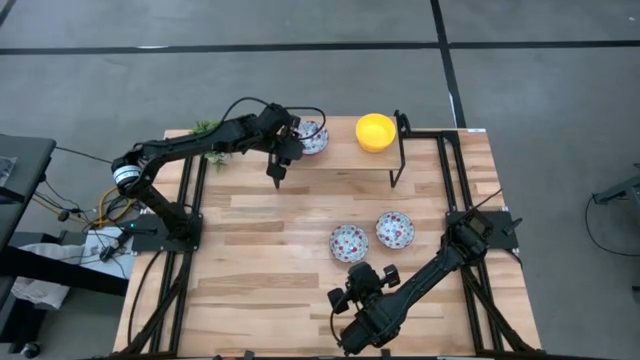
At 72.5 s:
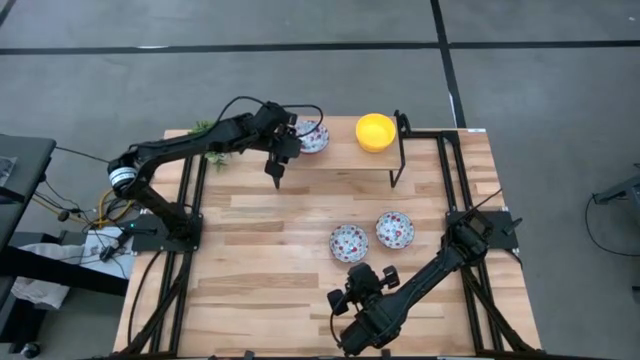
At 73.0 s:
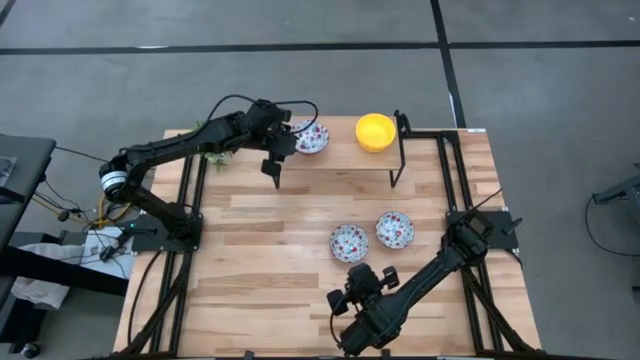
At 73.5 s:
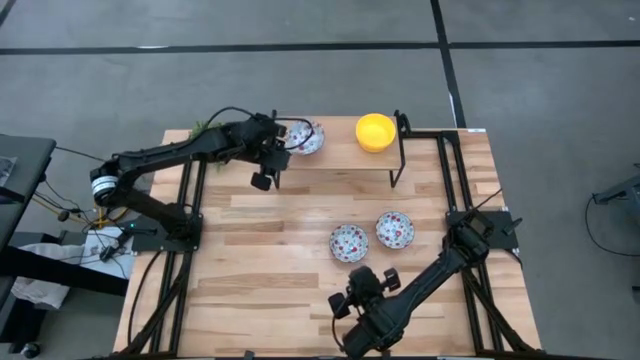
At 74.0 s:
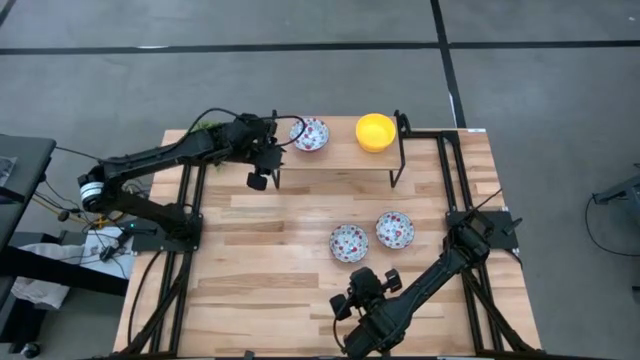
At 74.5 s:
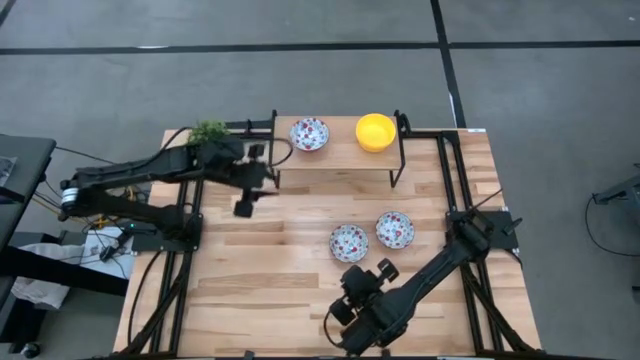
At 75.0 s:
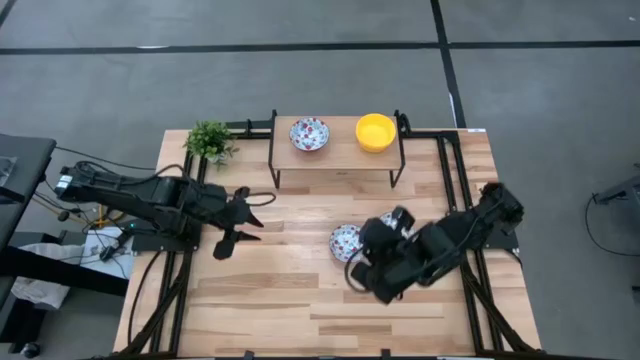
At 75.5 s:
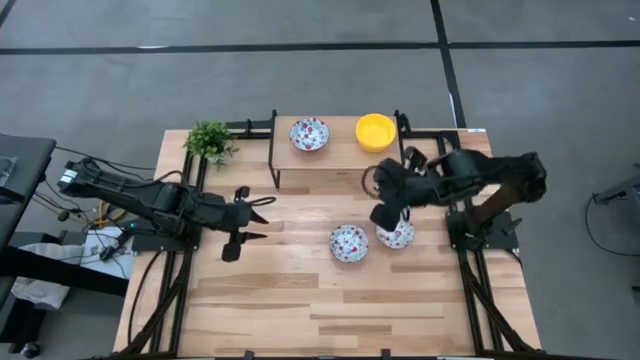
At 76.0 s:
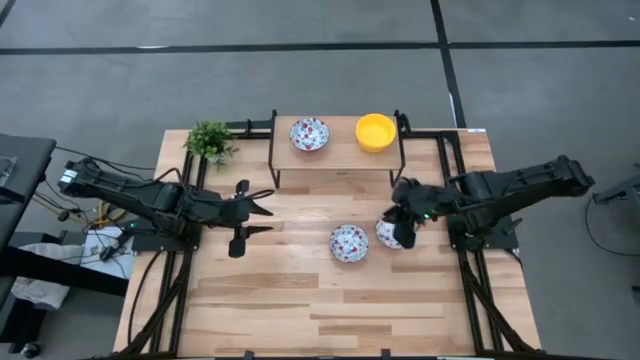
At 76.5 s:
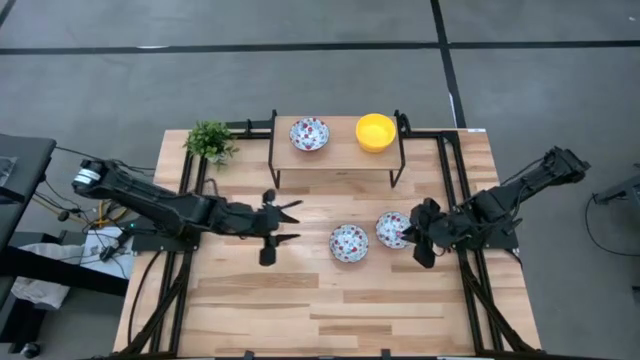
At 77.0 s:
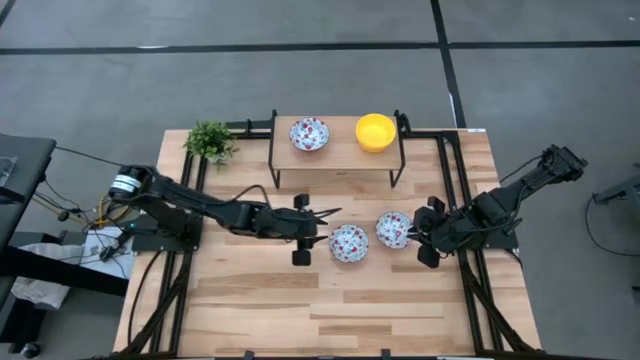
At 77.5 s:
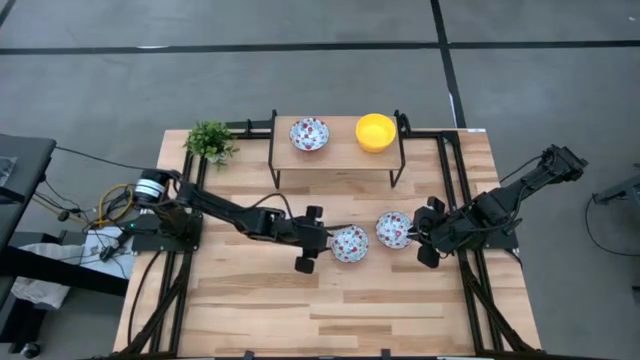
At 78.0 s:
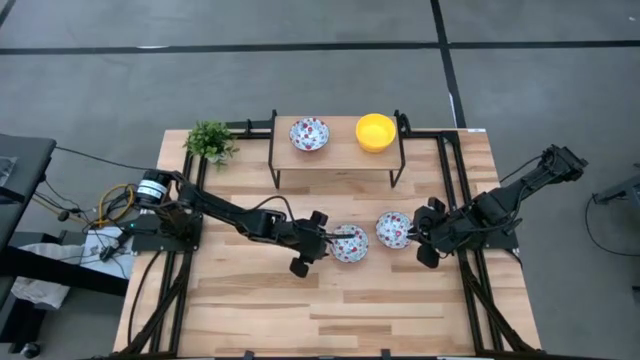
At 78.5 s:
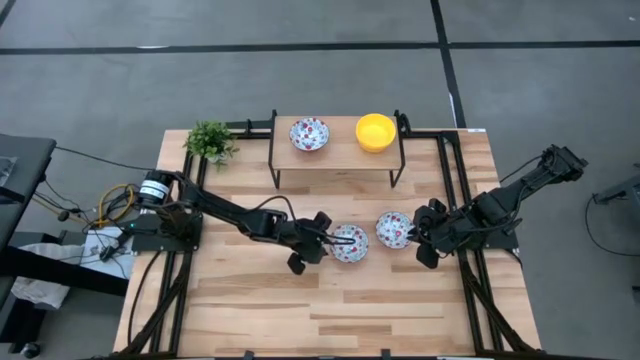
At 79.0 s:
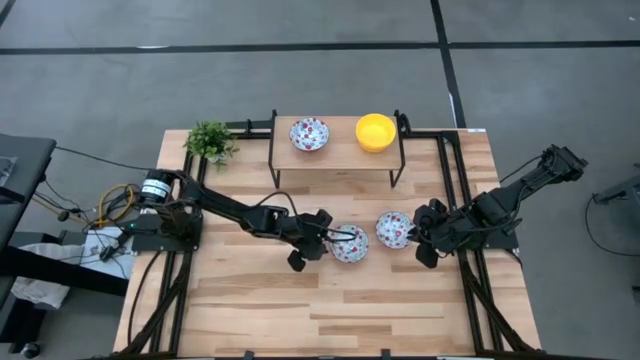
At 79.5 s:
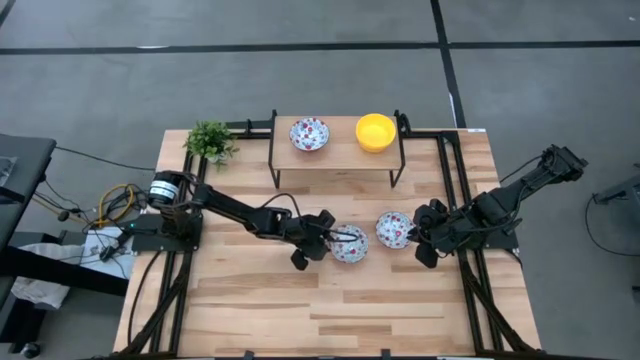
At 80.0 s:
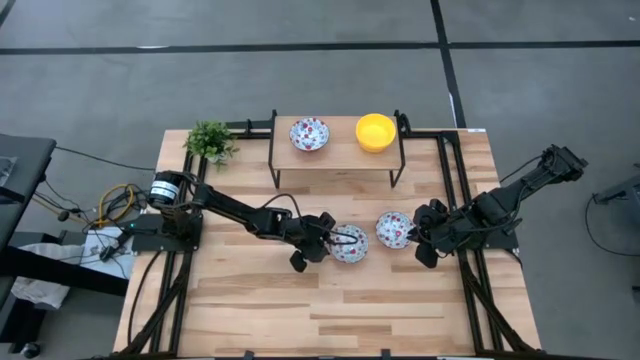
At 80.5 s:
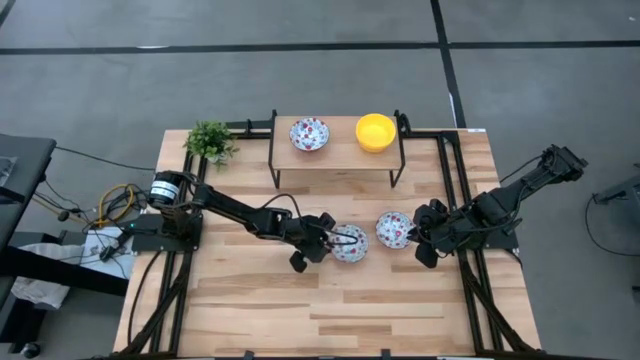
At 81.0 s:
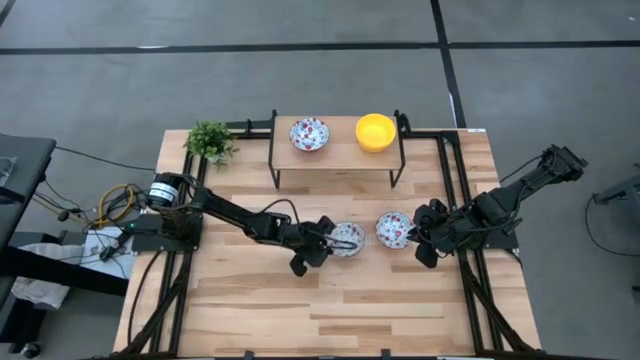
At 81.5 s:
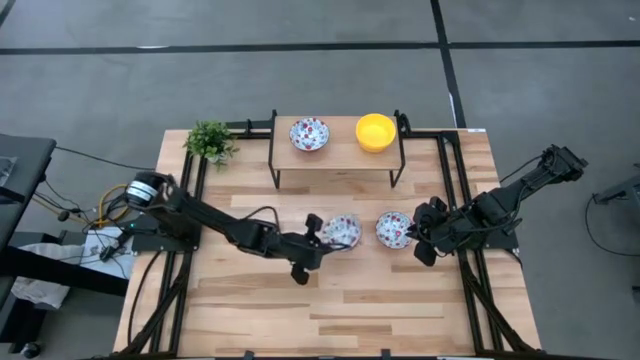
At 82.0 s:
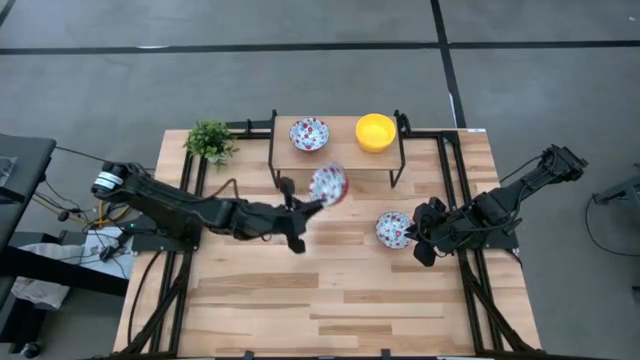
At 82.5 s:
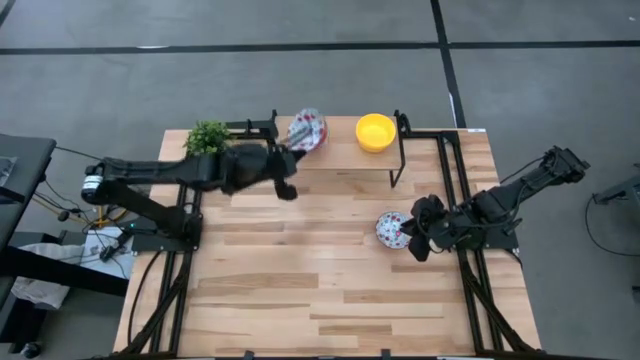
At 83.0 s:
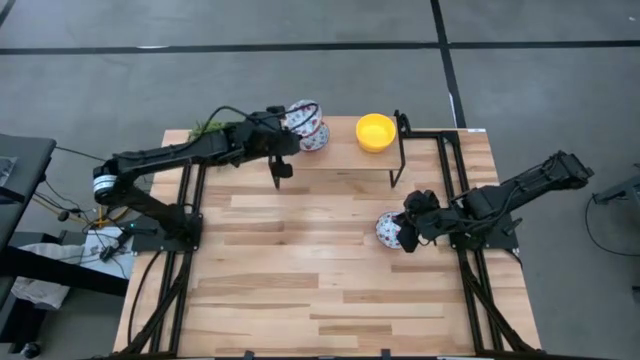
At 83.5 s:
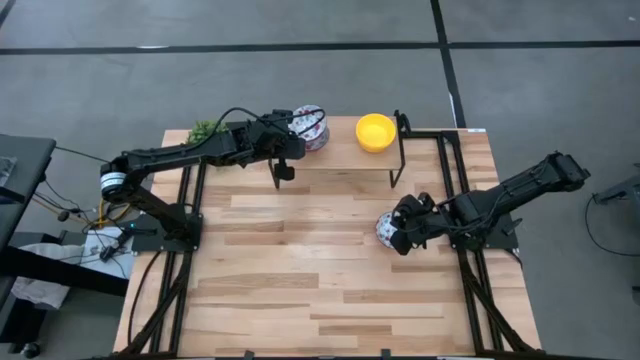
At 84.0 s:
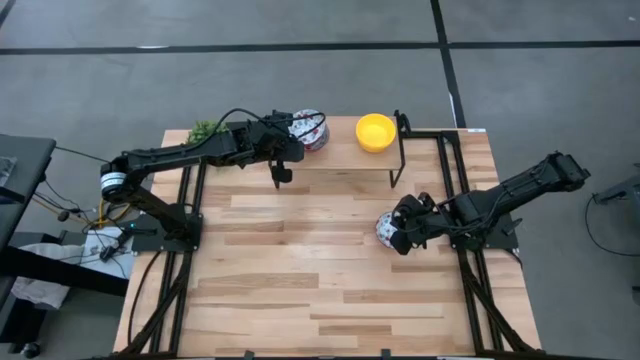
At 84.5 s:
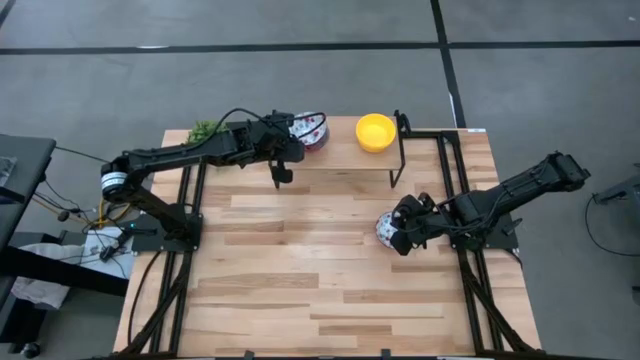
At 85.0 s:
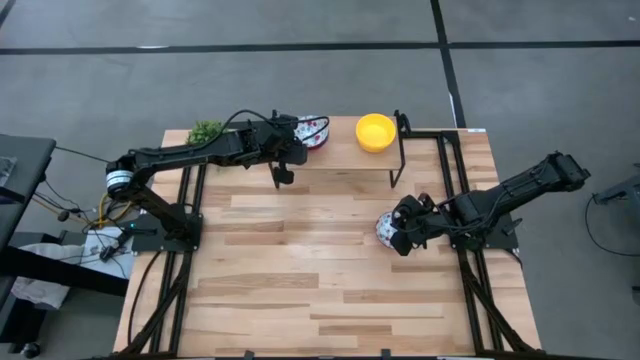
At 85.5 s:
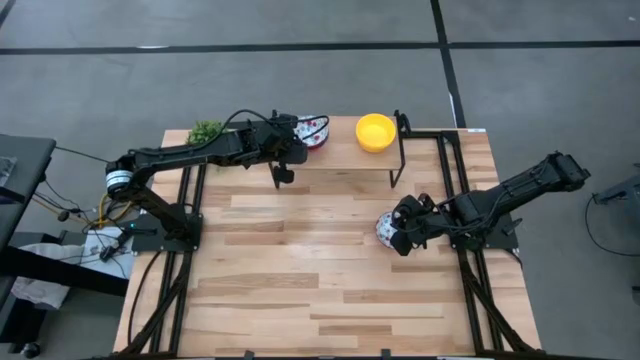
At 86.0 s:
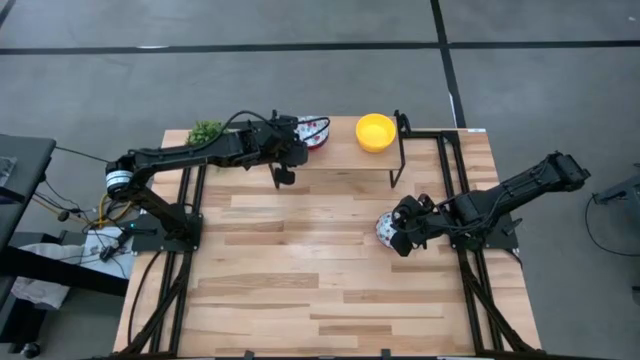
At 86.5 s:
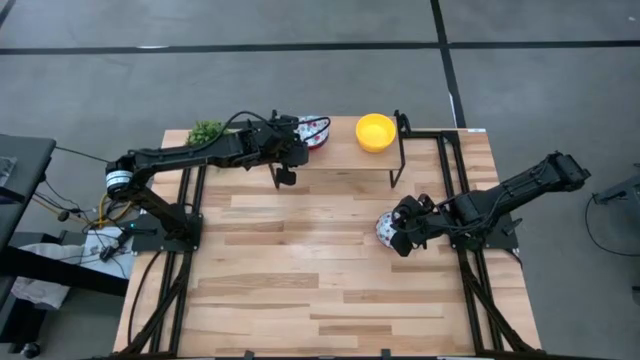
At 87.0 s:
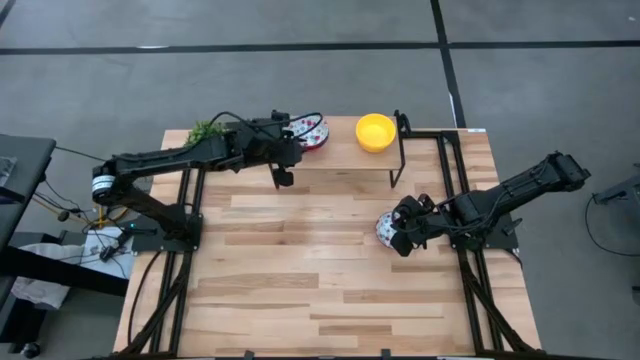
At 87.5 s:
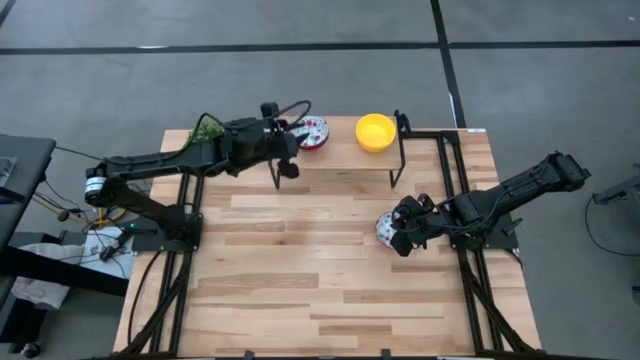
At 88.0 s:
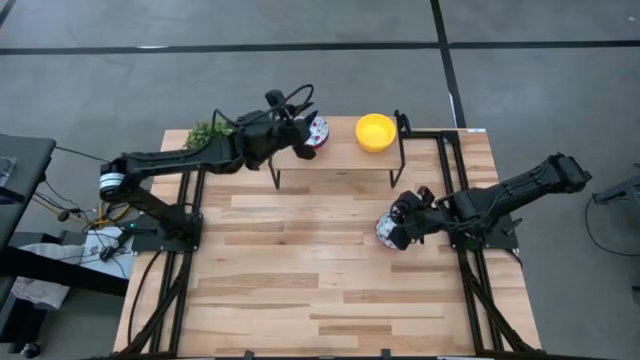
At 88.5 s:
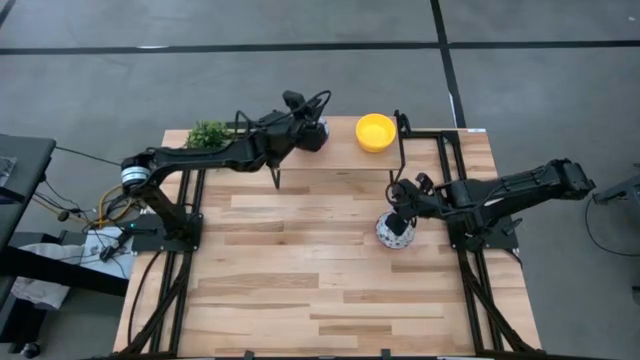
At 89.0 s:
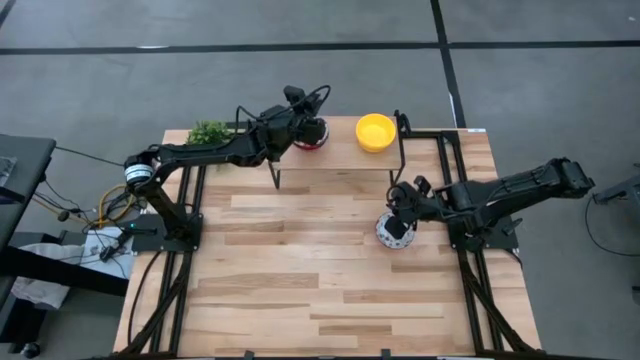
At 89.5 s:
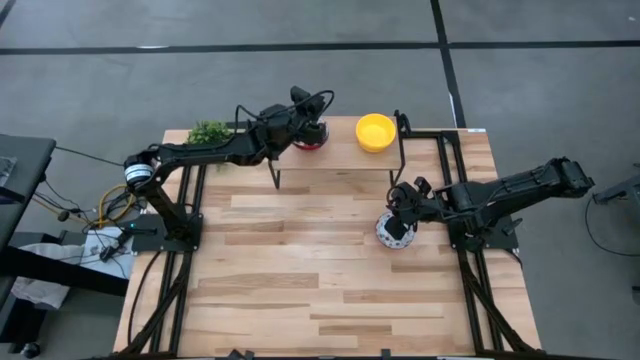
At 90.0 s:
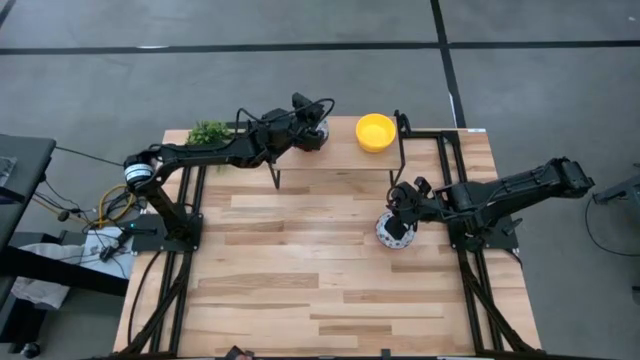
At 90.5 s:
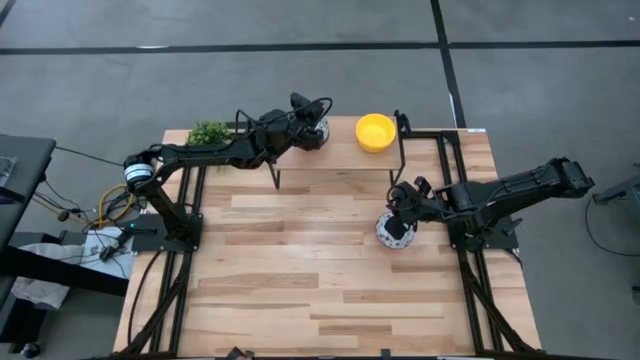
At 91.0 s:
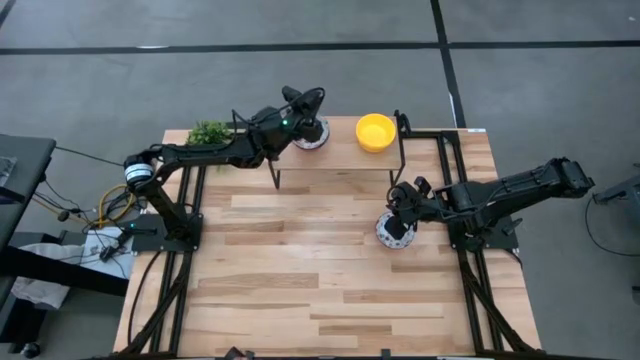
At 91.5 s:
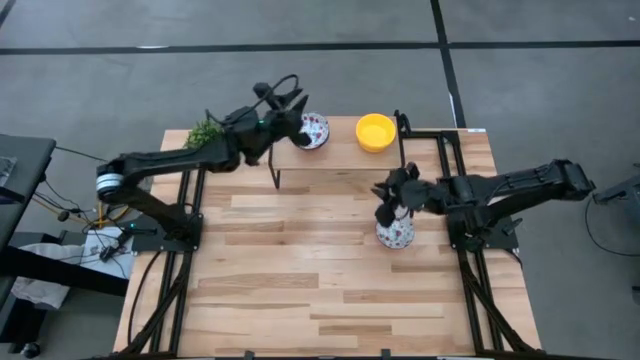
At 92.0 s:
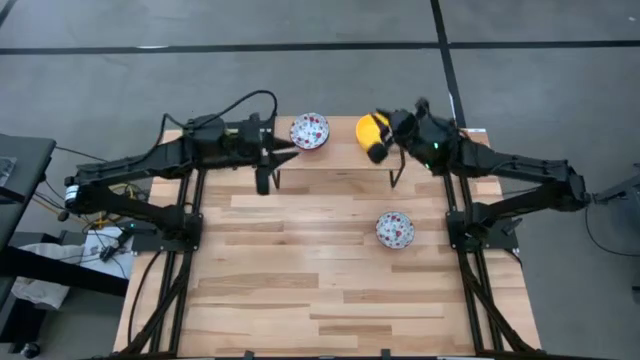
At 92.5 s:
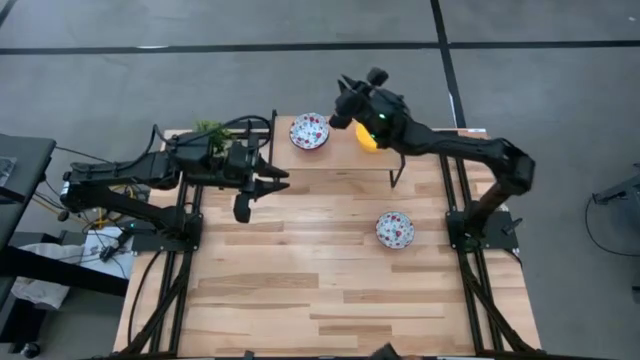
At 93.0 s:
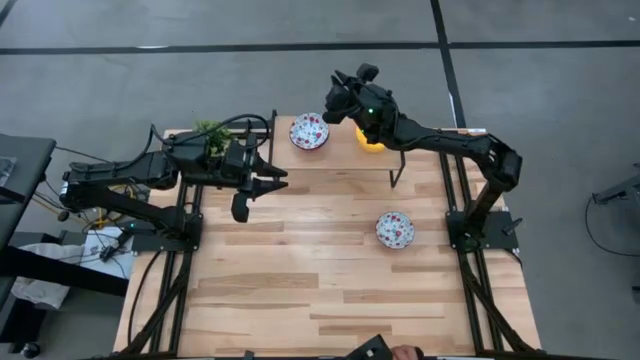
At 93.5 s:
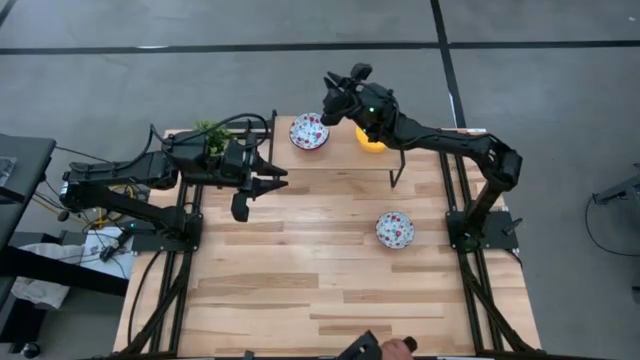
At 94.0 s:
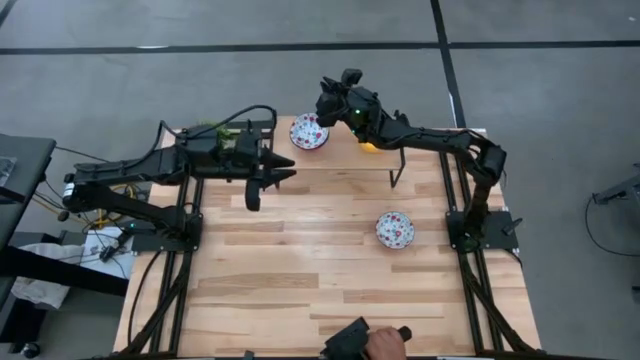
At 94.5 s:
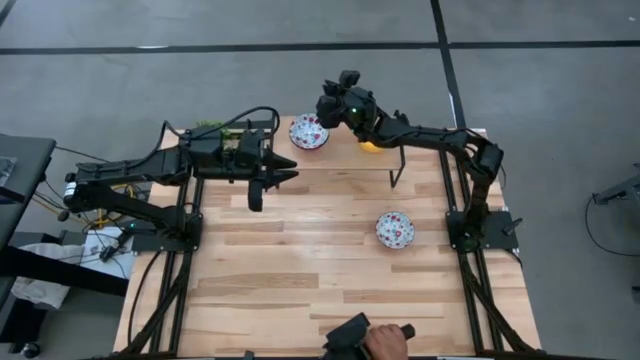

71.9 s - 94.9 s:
Task: Pick & Place Mini bowls
Stack the left patterned bowl on top of the patterned bowl on the shelf
